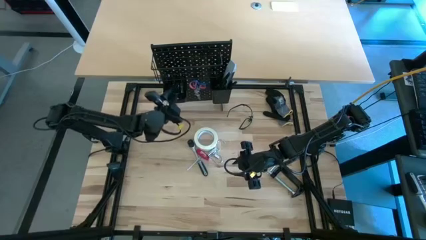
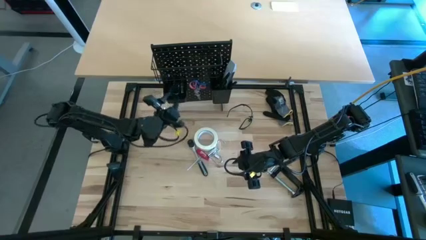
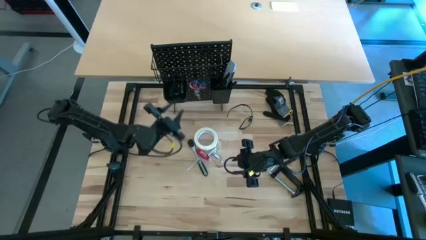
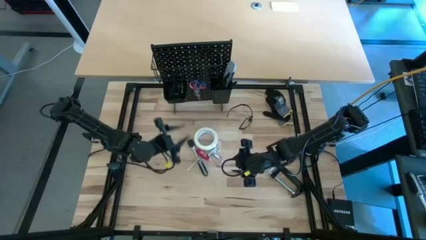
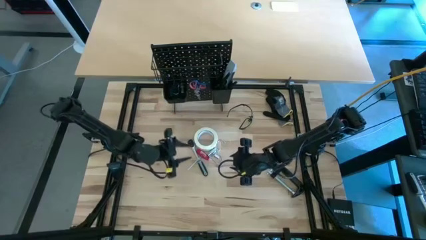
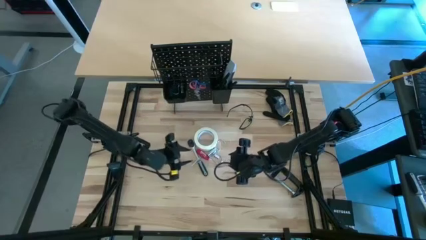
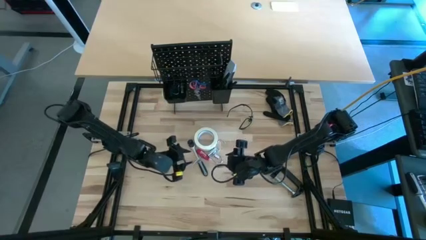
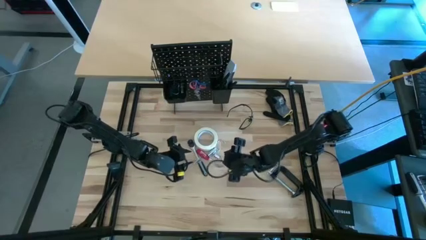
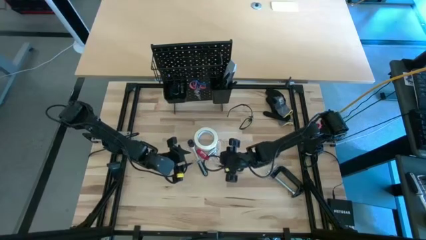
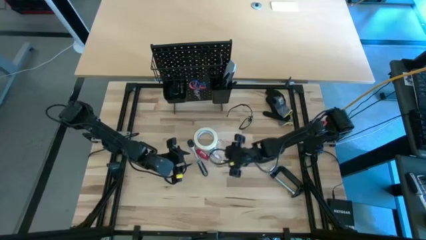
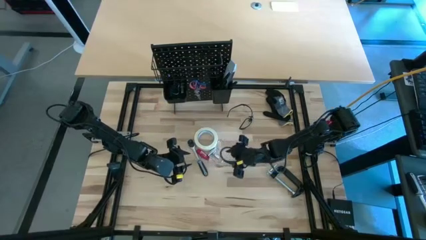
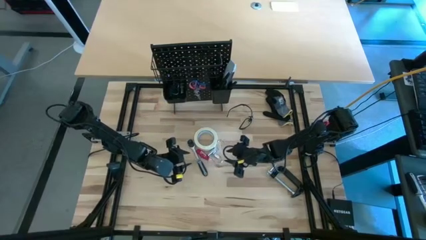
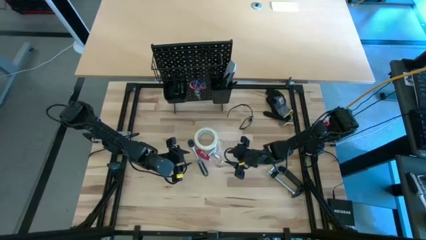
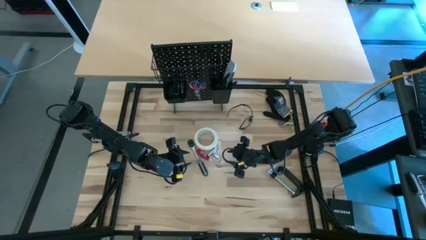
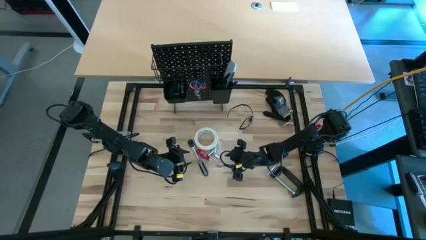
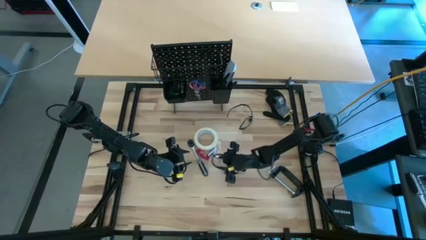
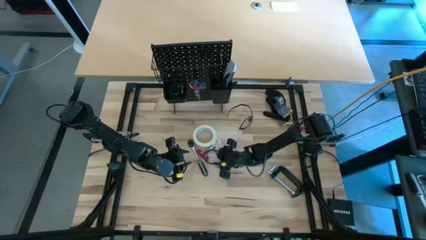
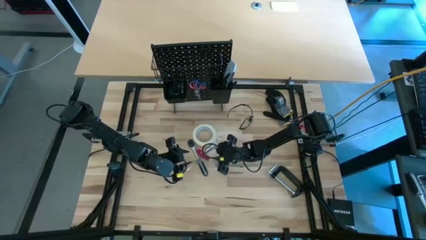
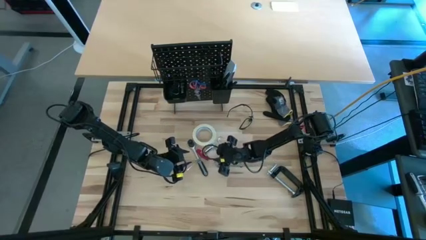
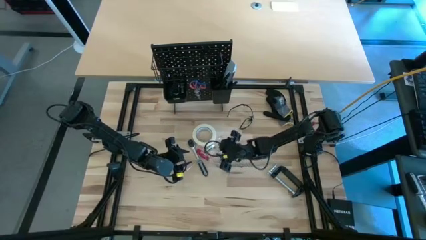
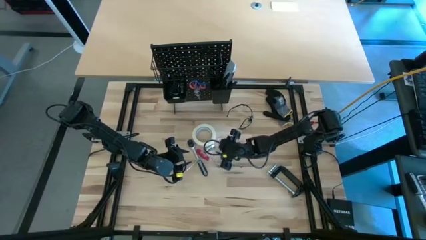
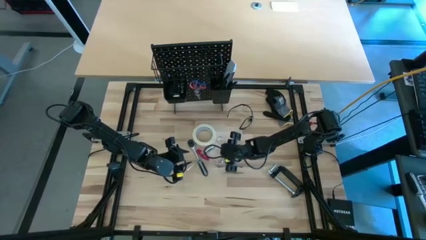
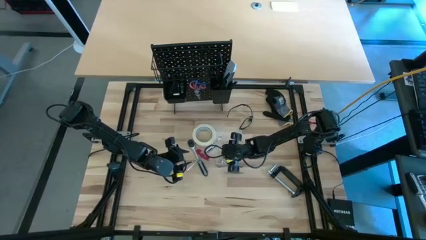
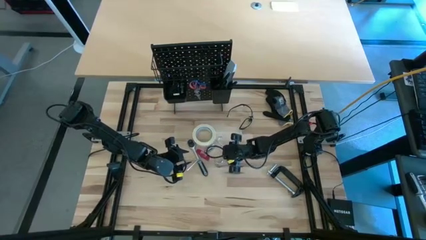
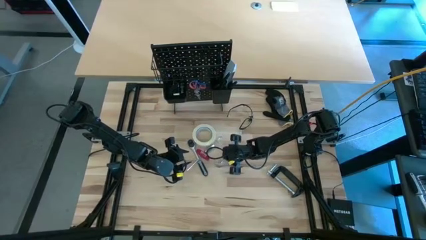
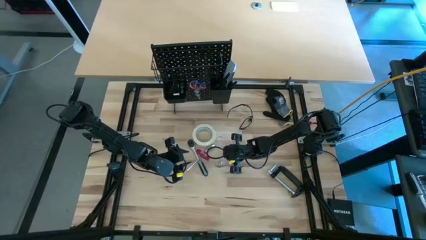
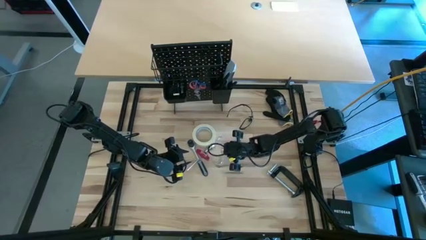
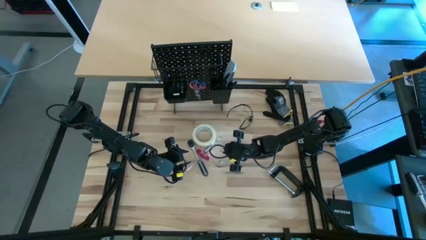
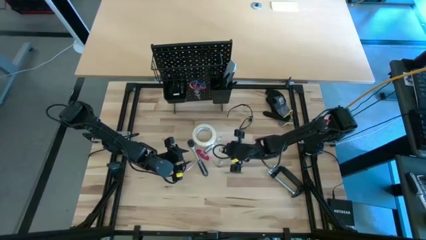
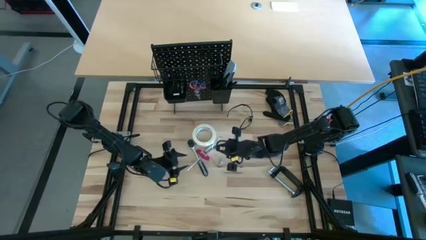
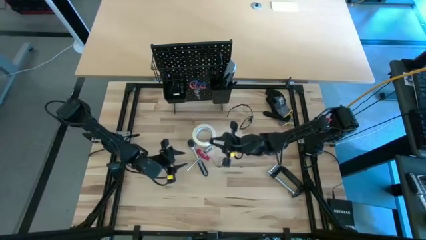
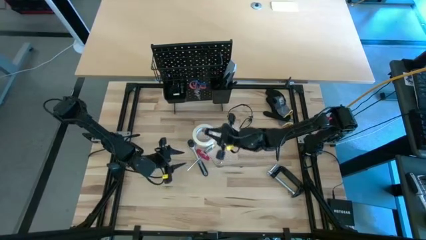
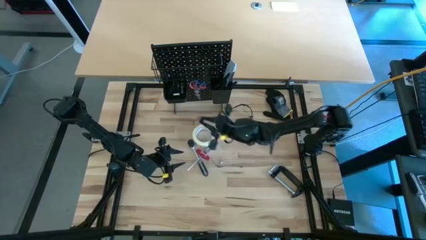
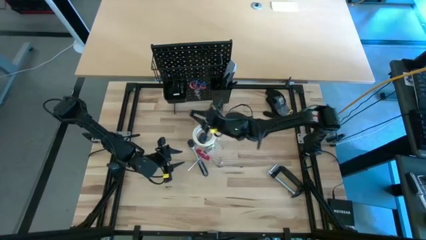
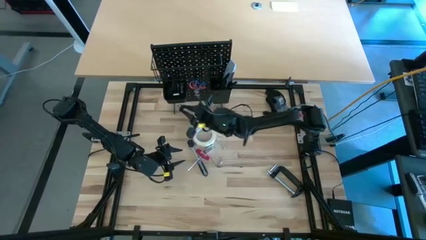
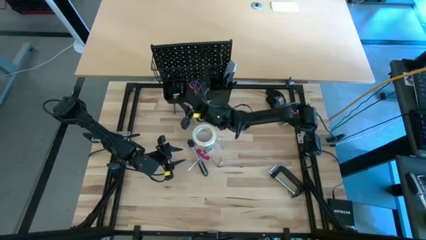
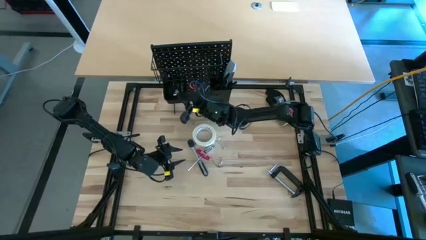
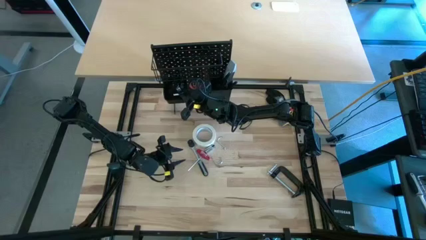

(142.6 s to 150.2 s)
Task: Hang tools onto peg board
Put the silver socket into the left black bin on the peg board

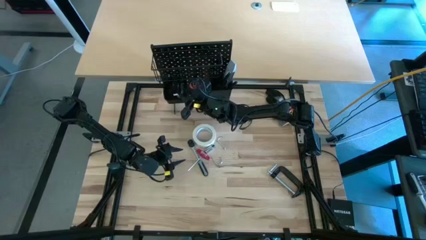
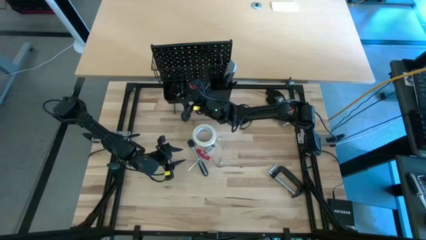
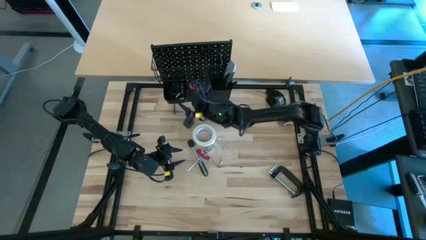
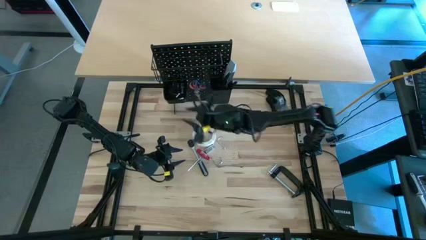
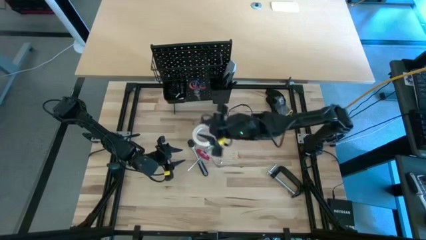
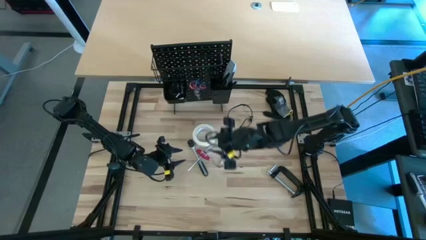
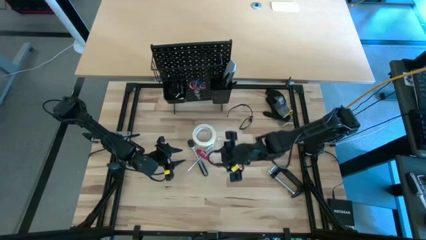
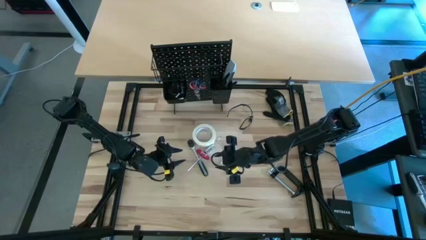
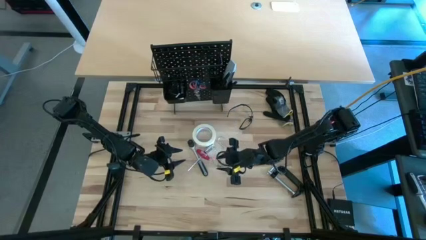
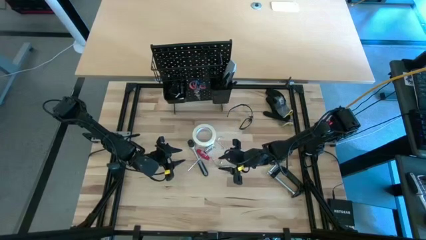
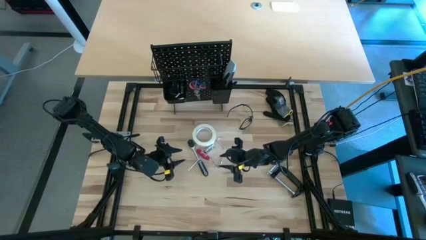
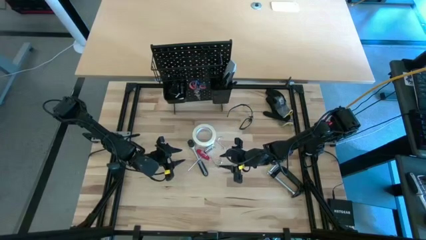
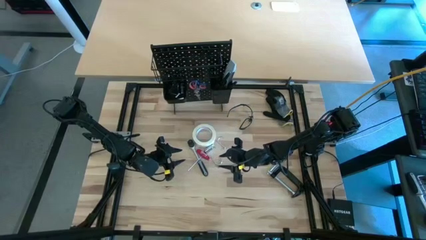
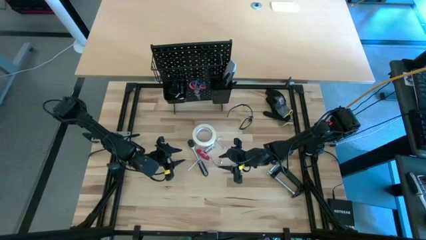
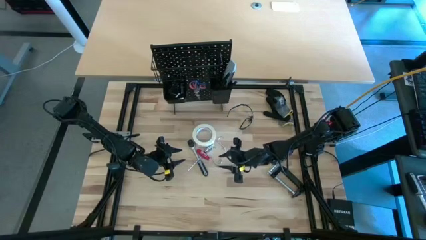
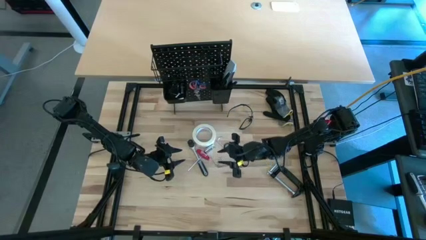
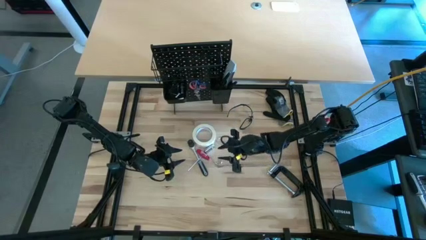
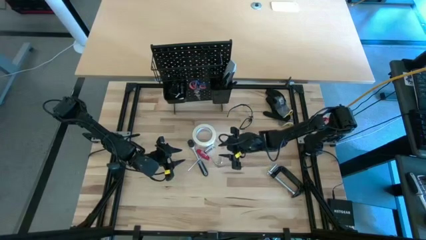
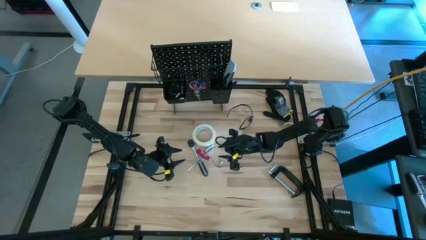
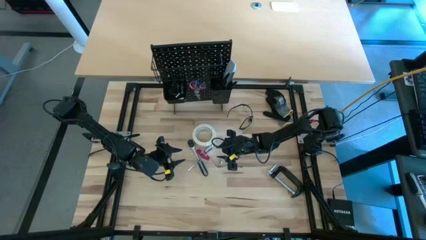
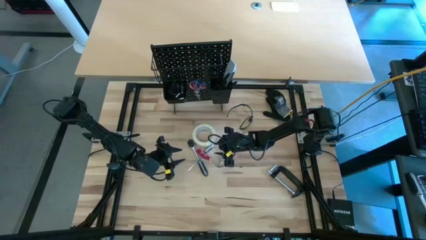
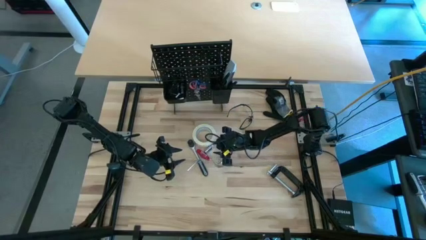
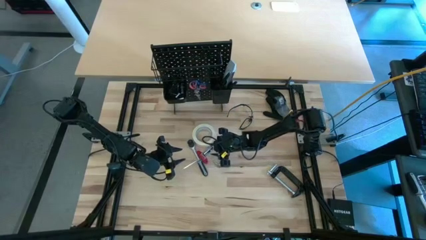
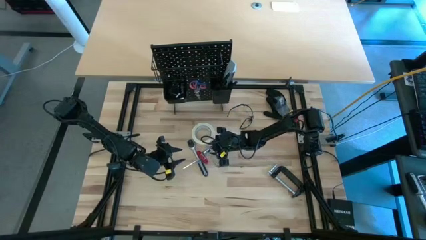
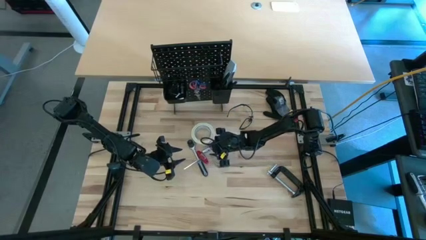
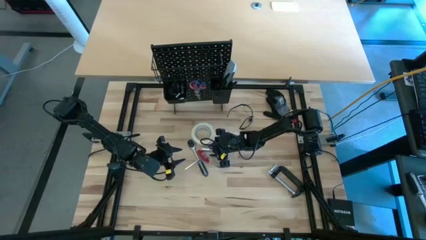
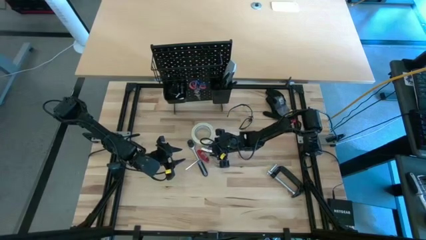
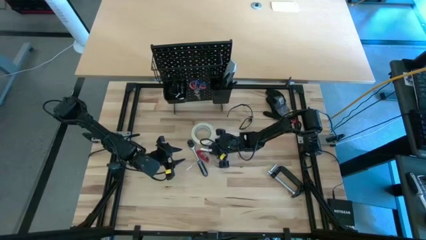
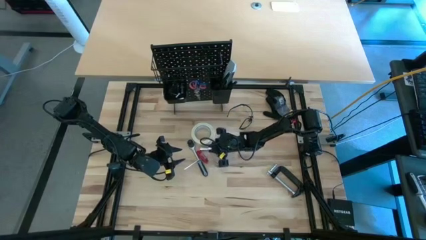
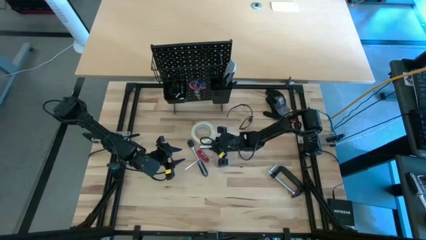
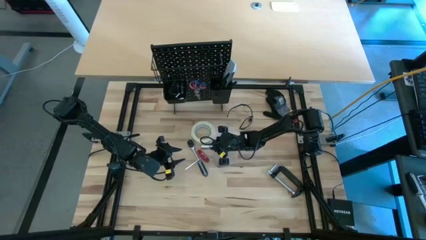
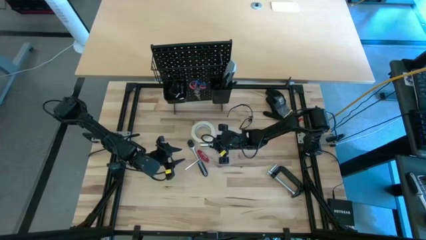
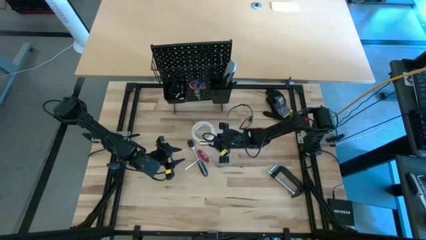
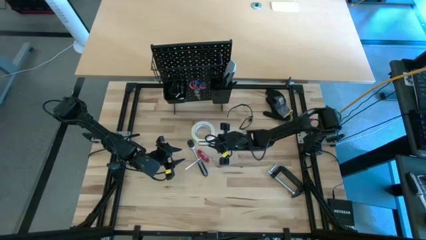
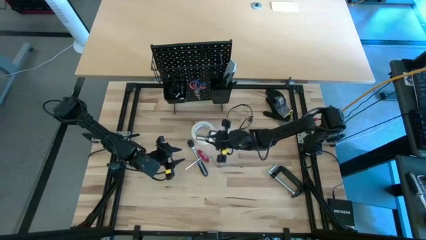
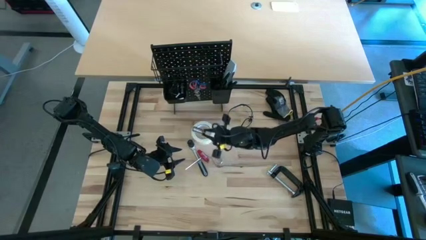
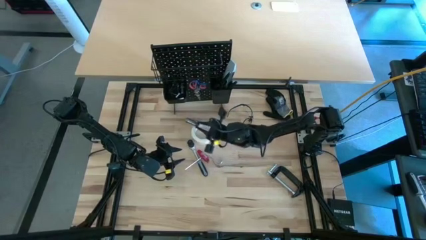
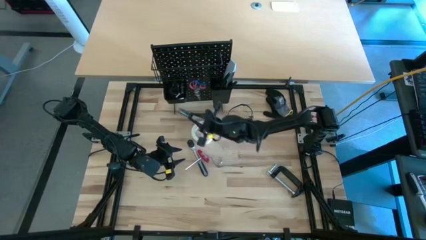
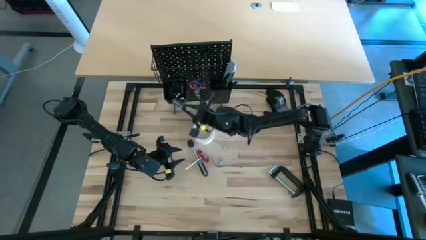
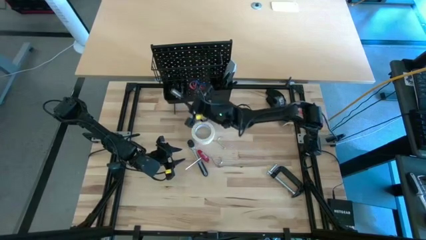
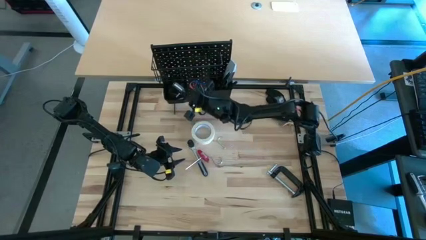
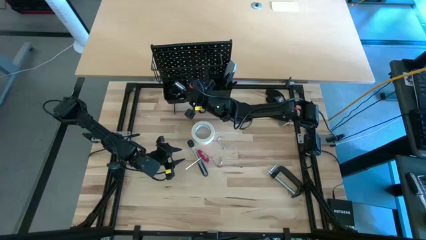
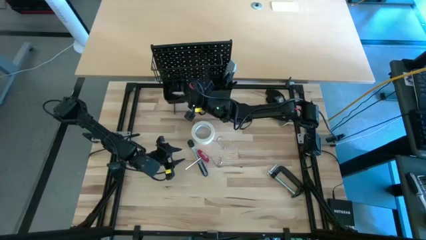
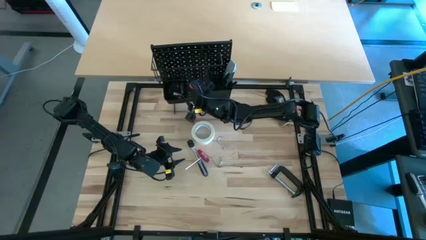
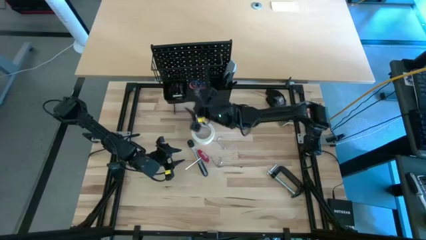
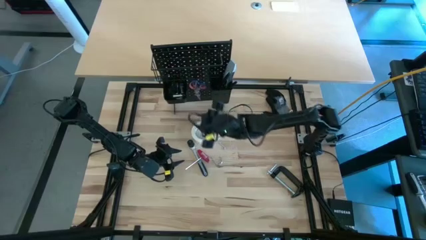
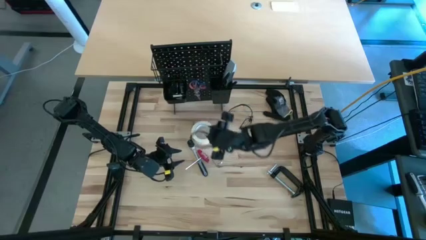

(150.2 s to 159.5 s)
Put the silver extension bar into the left black bin on the peg board
